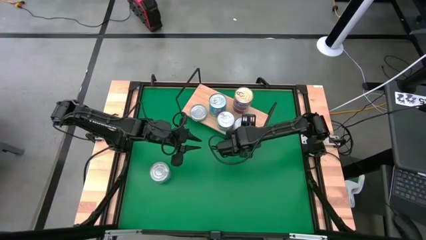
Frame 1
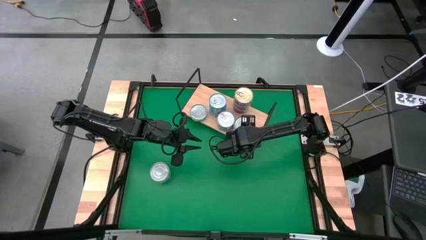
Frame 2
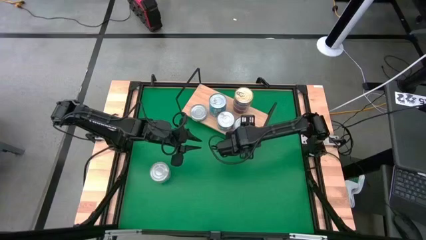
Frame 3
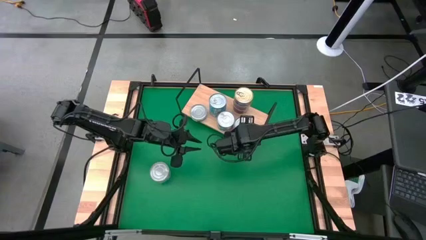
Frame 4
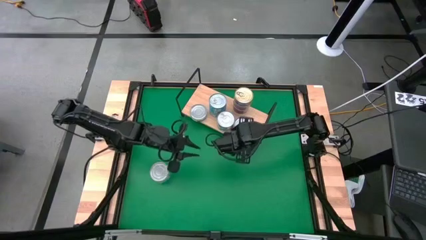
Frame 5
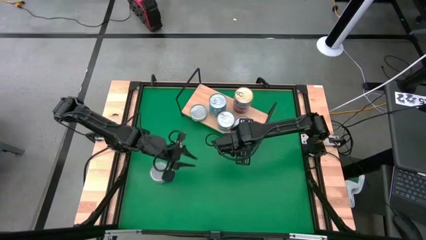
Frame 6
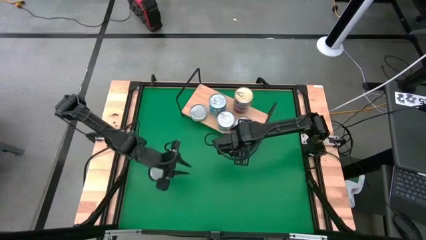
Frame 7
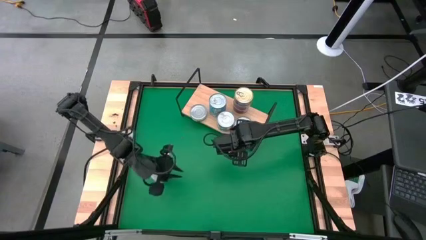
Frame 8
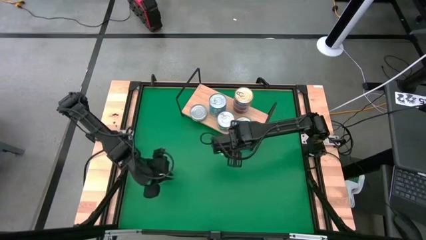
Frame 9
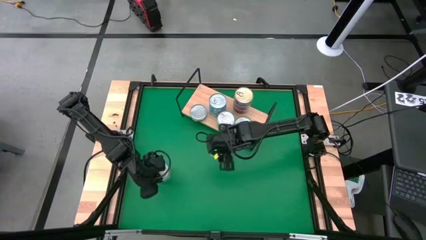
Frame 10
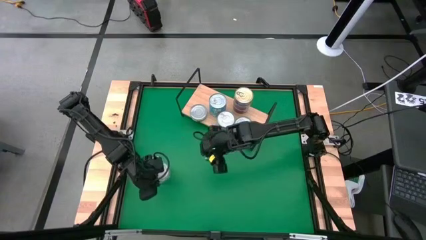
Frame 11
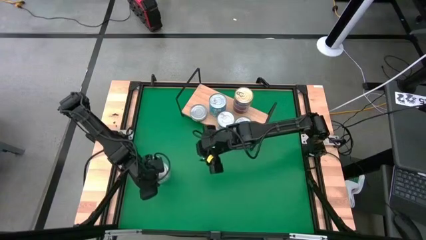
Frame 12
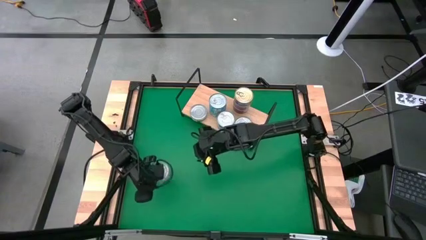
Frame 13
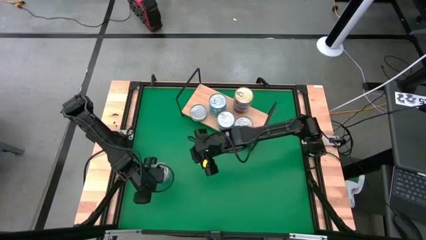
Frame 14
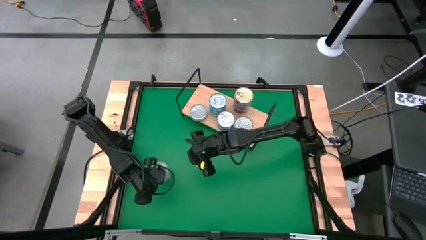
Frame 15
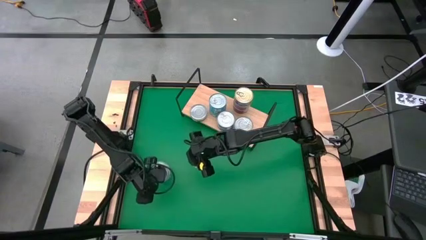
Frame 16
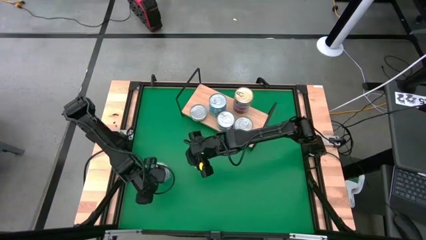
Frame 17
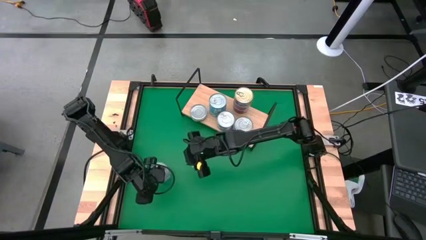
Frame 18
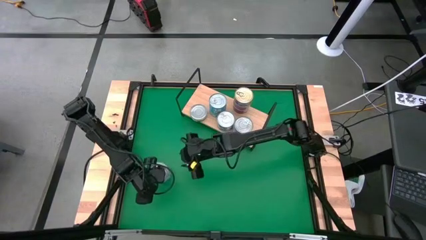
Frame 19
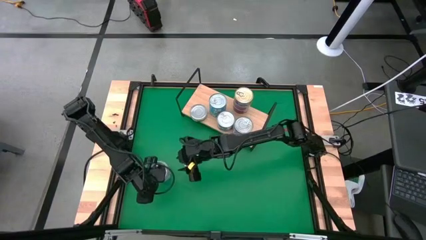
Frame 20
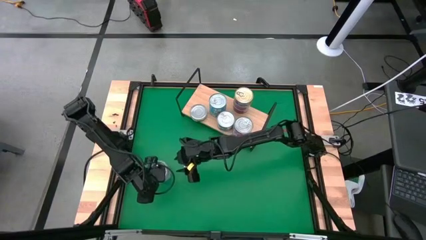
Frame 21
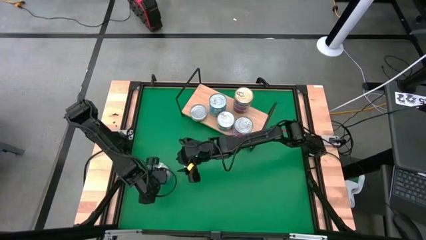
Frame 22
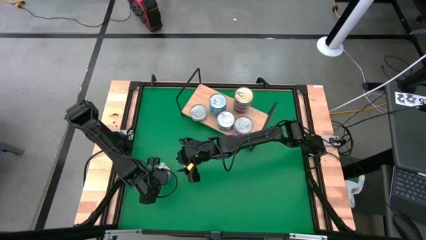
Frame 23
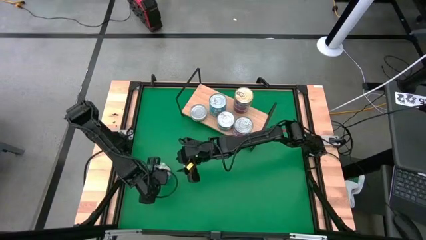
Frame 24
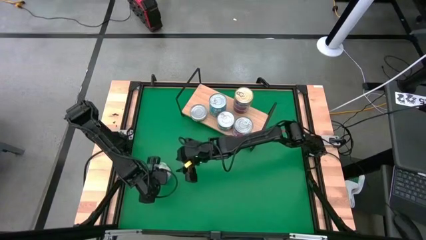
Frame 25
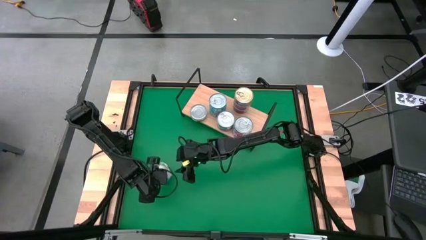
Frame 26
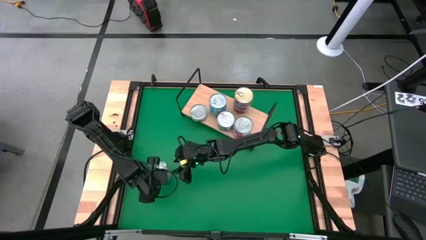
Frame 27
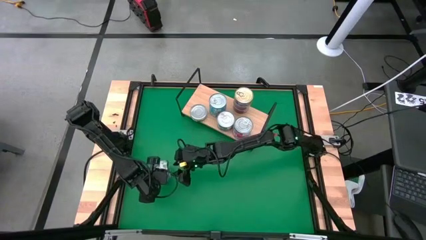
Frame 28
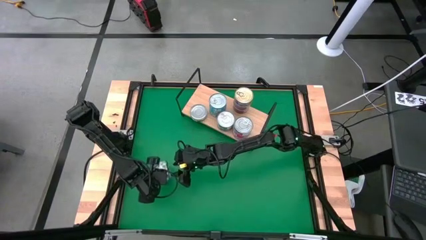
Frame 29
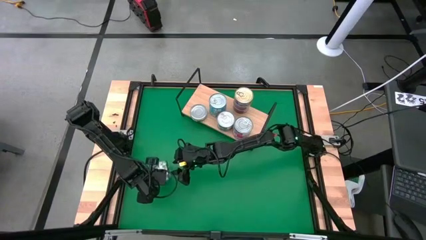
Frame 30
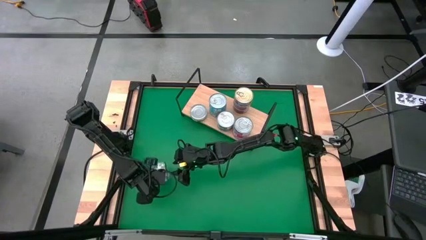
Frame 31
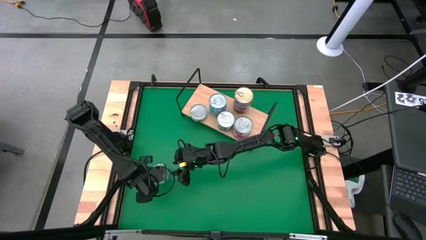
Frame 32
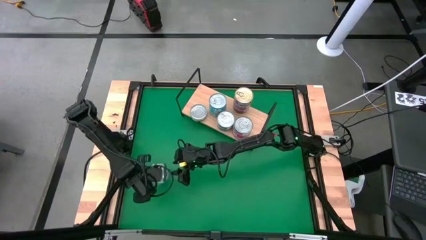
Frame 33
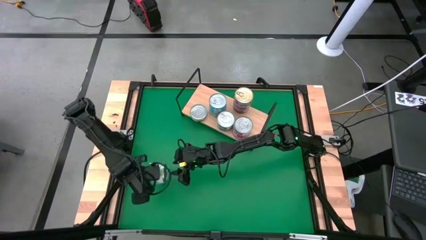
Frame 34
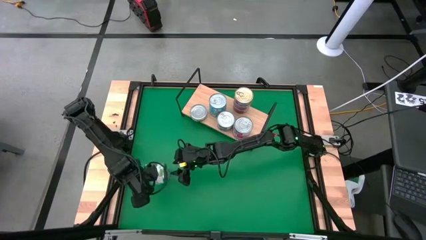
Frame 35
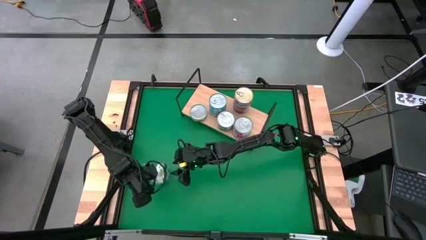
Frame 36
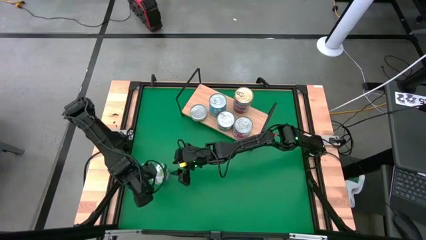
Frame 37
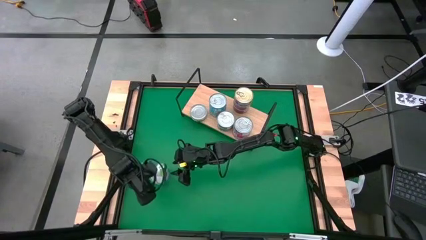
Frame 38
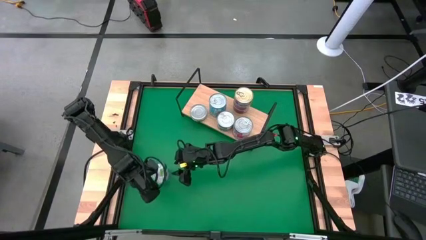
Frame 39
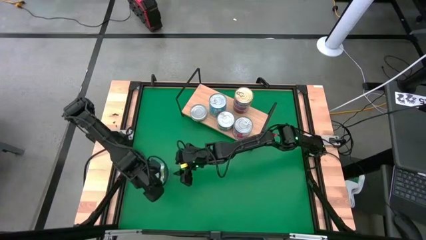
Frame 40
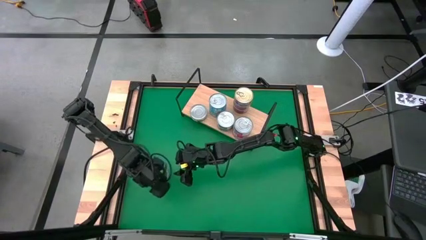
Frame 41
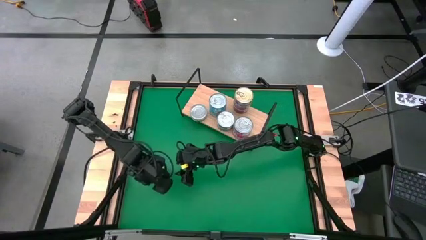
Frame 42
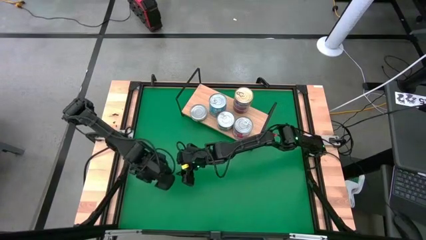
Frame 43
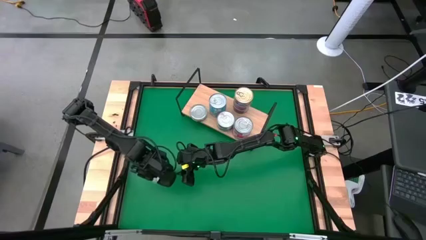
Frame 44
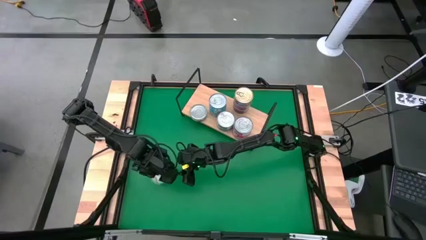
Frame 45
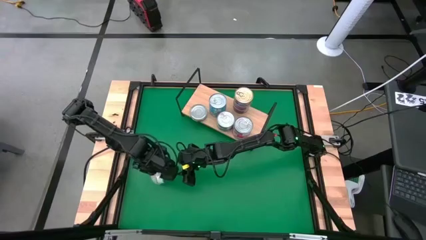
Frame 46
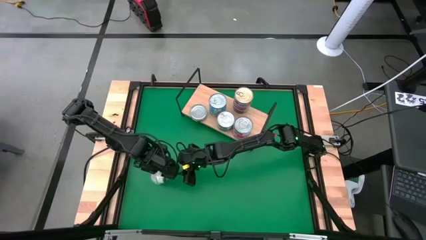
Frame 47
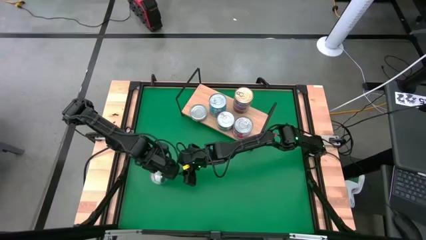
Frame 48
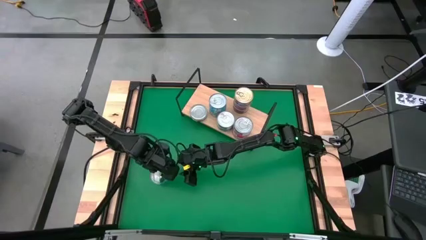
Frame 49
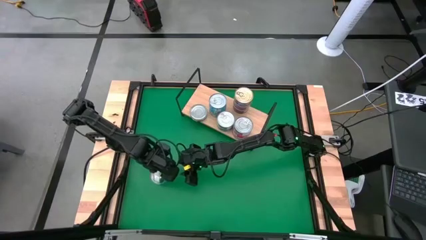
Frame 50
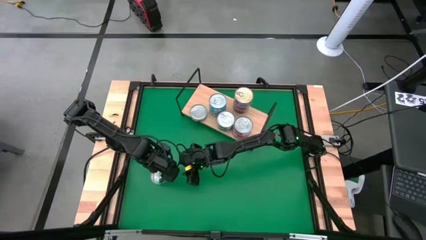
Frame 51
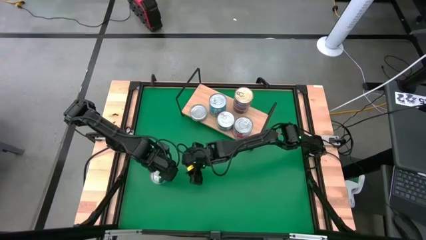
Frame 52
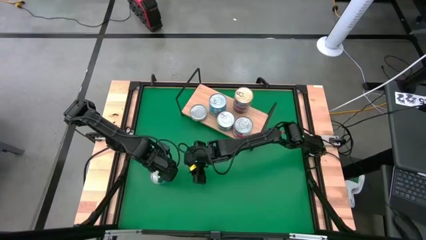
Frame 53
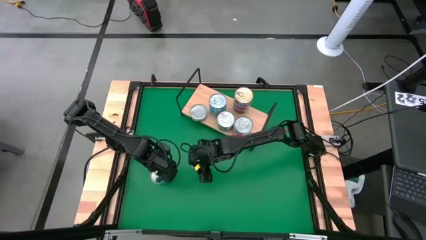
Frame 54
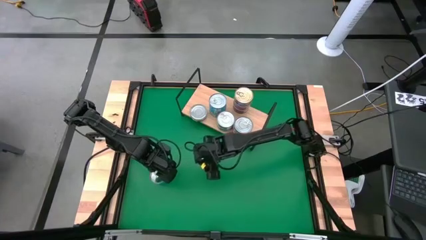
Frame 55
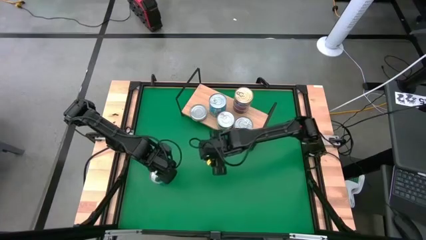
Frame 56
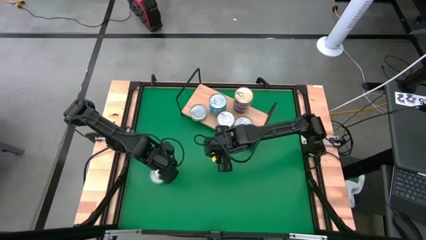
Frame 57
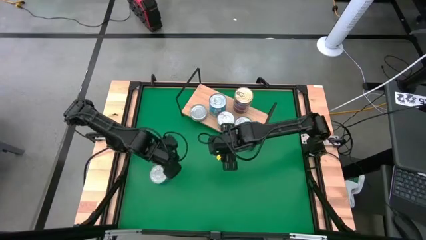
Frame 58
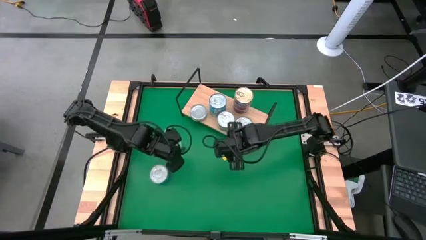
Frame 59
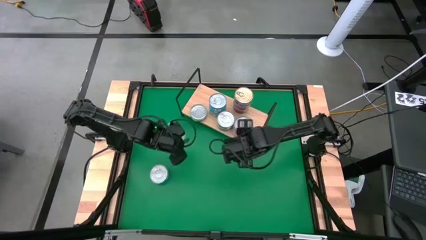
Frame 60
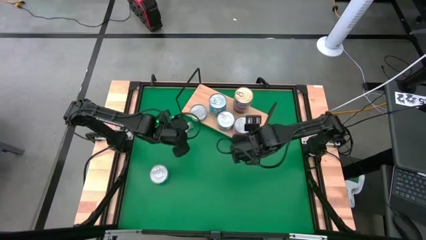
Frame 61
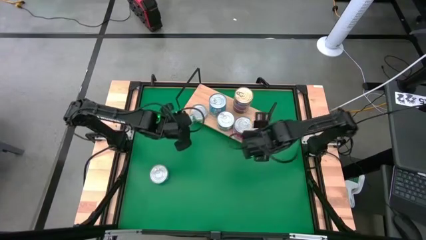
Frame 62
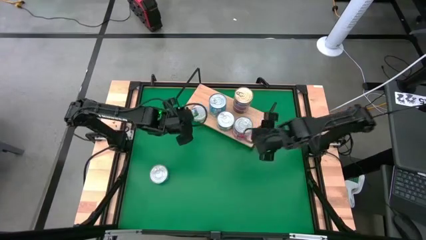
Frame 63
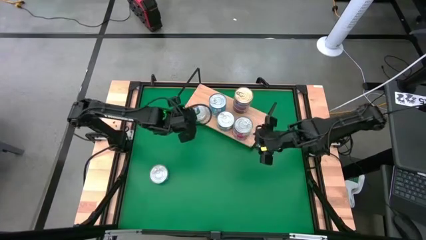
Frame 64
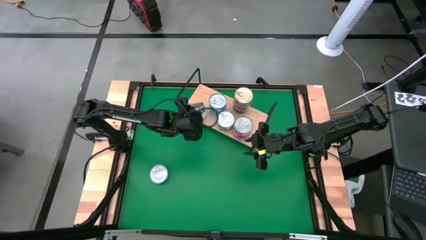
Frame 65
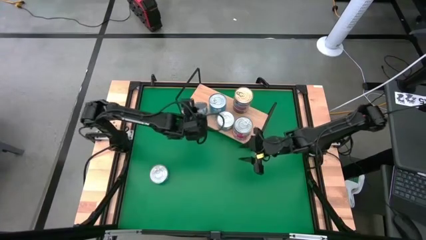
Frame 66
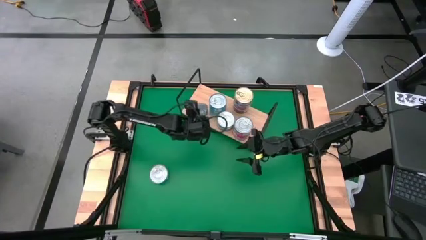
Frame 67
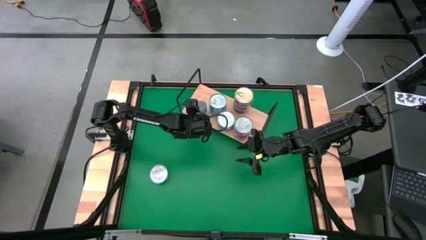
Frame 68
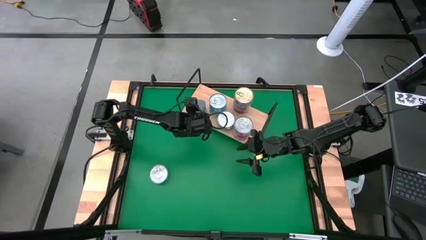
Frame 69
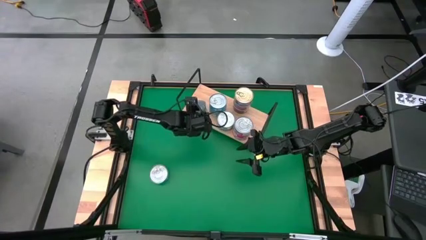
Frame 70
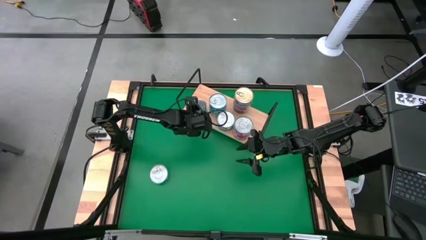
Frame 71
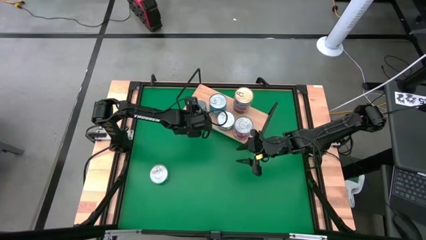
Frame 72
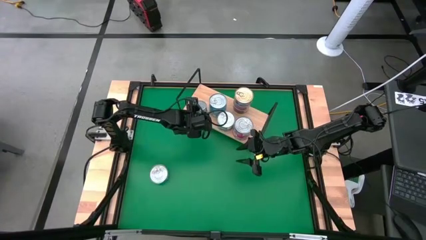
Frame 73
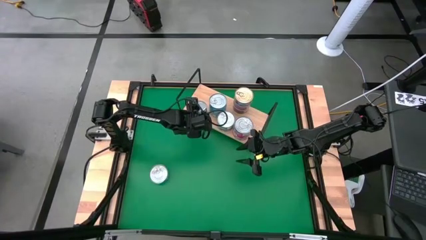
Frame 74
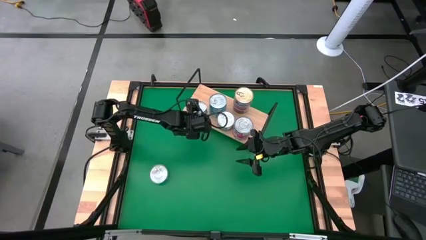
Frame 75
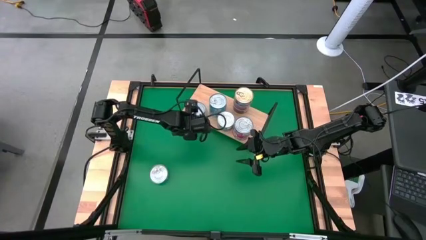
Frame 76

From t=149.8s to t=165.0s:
Task: Stack canned seafood by type on shelf
Stack the light green tuna can on top of the light green tuna can on the shelf

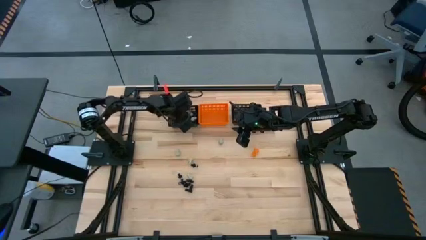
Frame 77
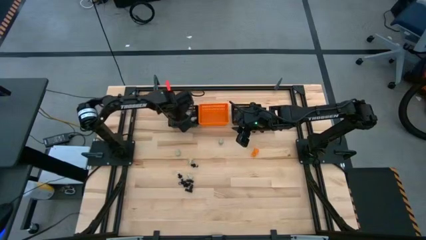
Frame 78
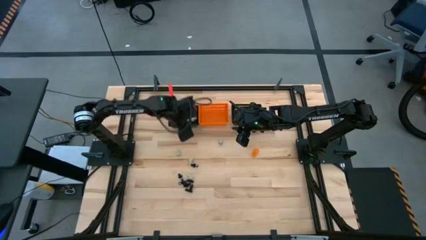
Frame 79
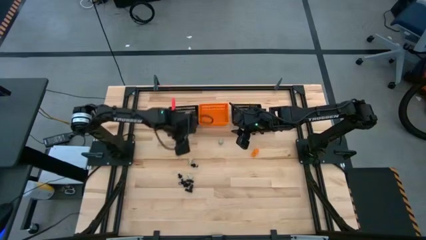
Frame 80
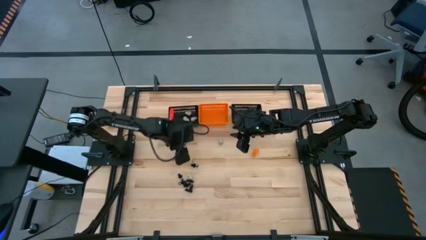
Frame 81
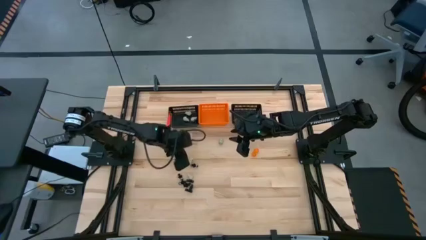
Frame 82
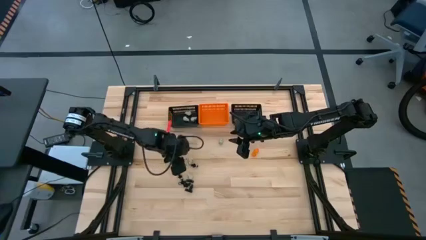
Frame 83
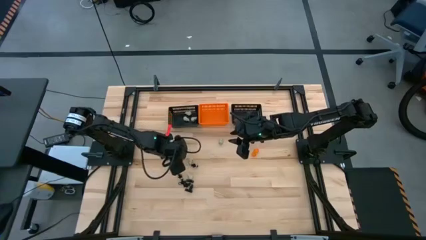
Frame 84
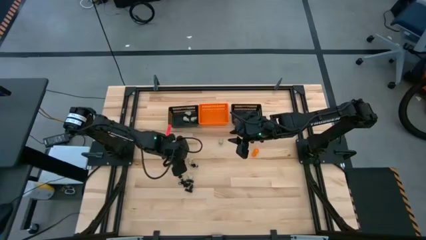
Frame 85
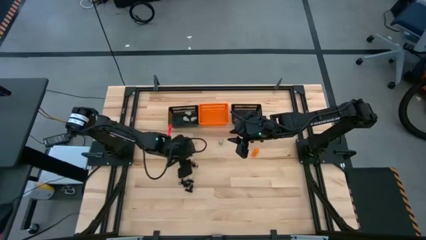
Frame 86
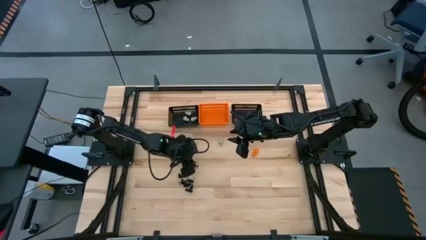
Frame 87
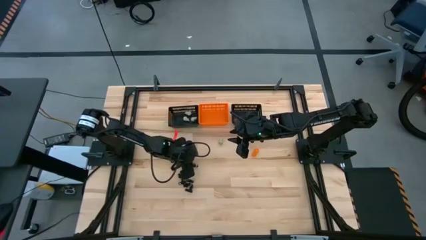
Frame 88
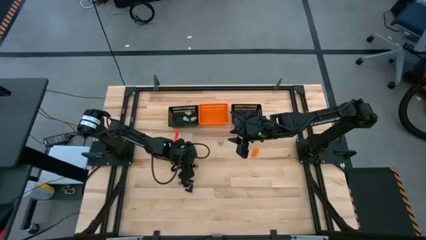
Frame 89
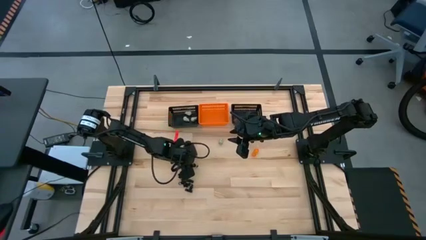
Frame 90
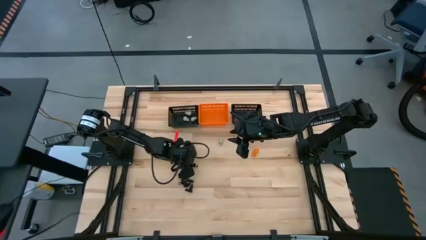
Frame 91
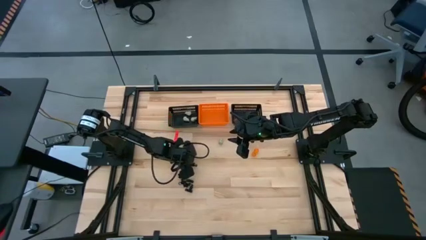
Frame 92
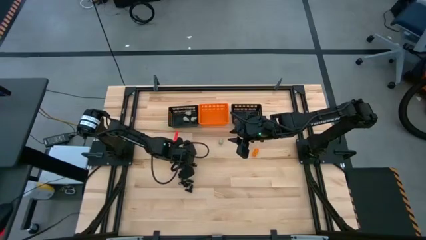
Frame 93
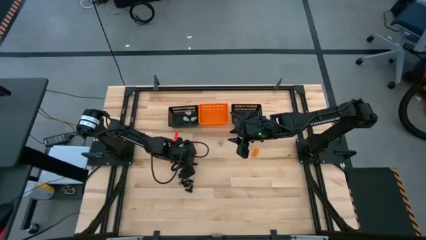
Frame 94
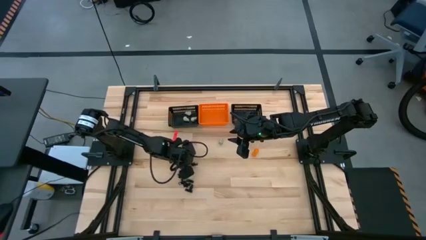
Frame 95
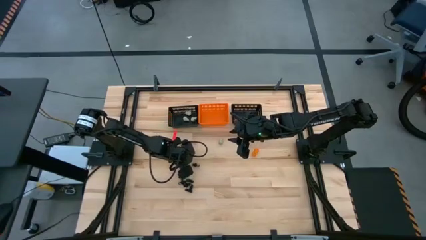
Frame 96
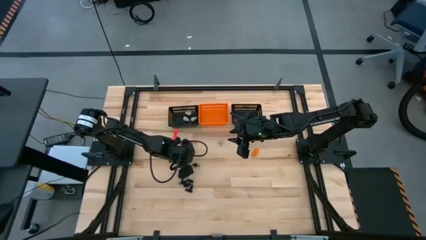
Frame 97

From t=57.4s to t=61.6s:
Task: Sort Halloween decoration
Put the white skull toy into the left black bin
